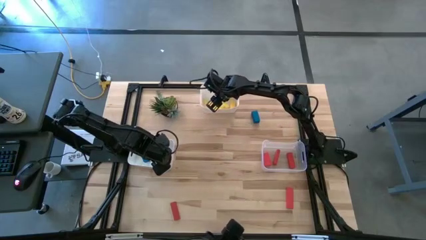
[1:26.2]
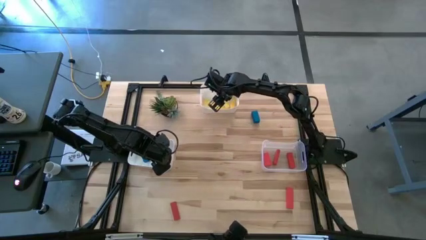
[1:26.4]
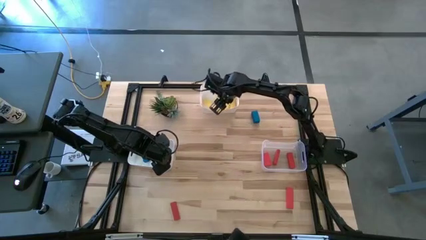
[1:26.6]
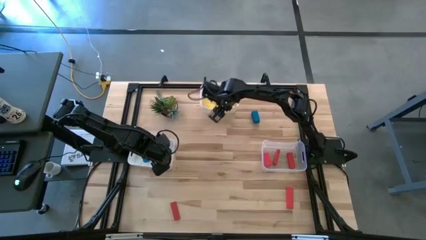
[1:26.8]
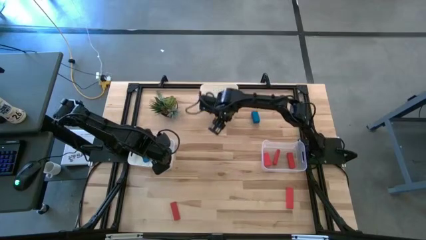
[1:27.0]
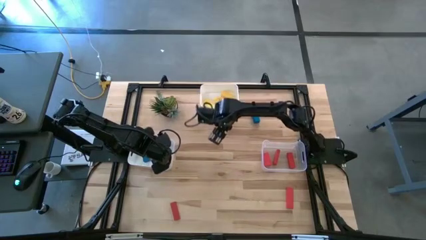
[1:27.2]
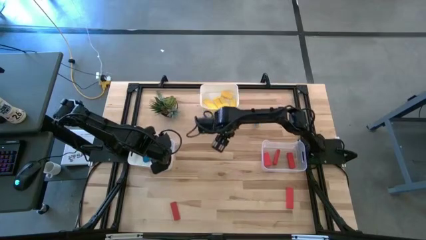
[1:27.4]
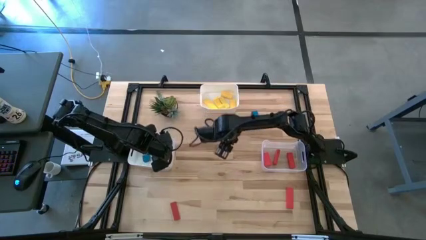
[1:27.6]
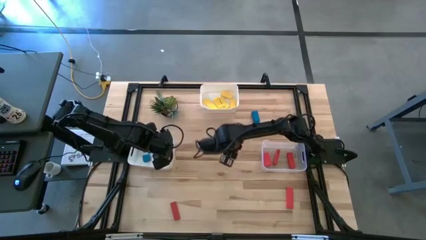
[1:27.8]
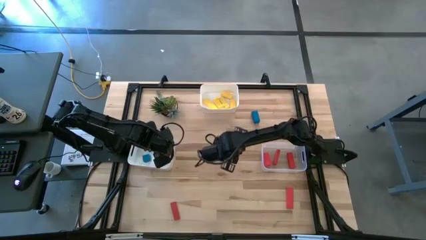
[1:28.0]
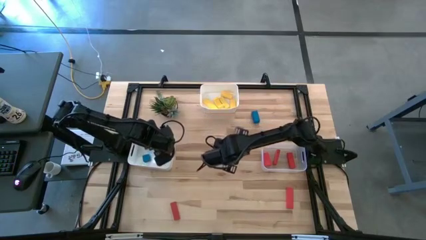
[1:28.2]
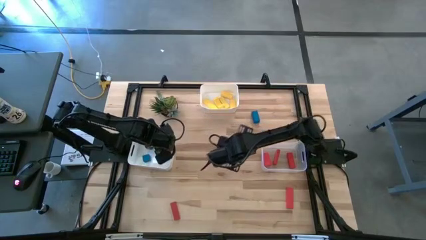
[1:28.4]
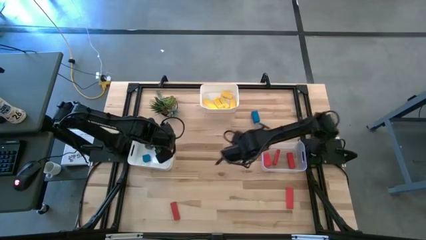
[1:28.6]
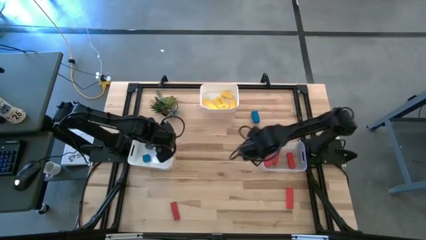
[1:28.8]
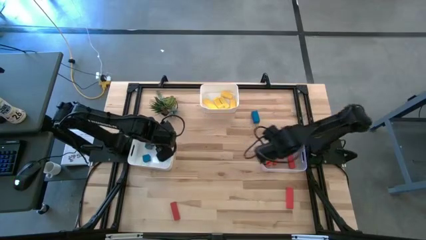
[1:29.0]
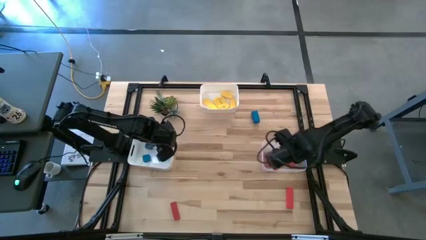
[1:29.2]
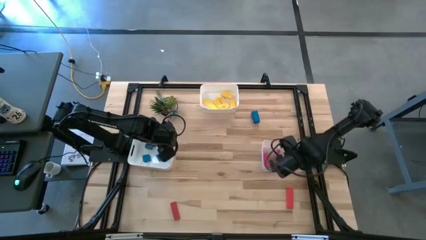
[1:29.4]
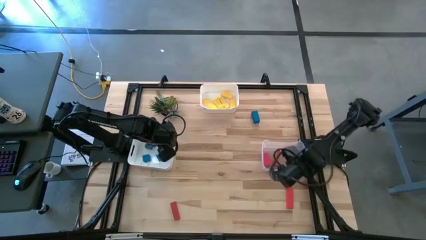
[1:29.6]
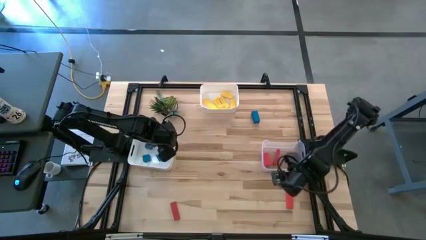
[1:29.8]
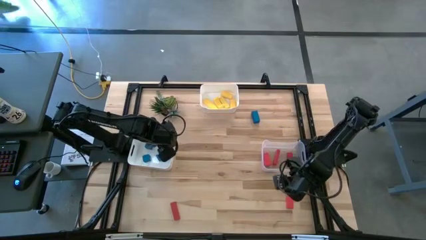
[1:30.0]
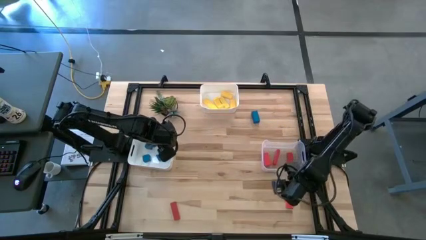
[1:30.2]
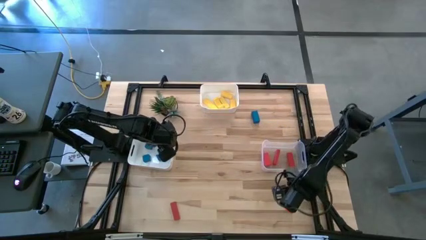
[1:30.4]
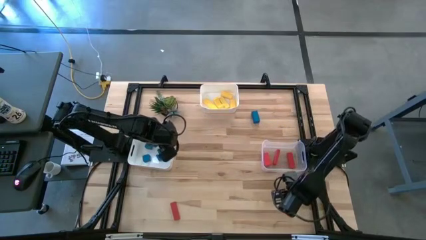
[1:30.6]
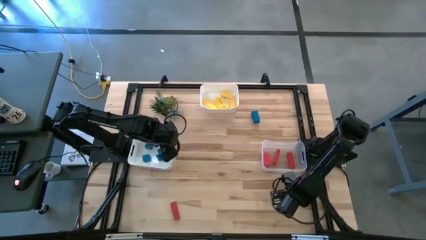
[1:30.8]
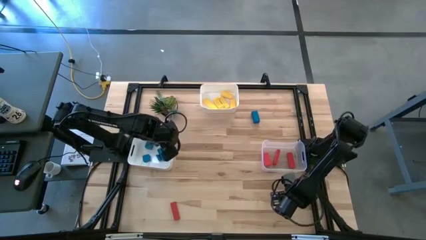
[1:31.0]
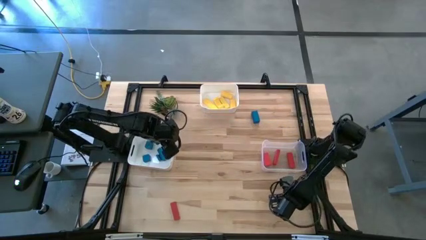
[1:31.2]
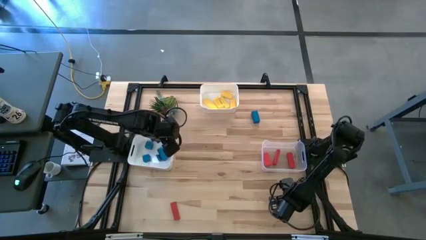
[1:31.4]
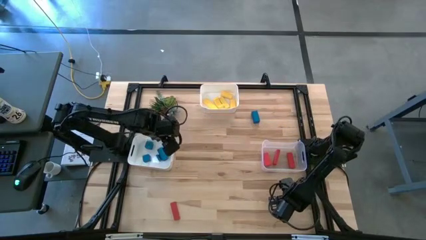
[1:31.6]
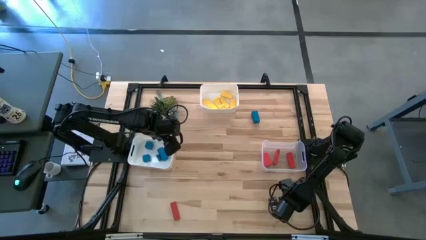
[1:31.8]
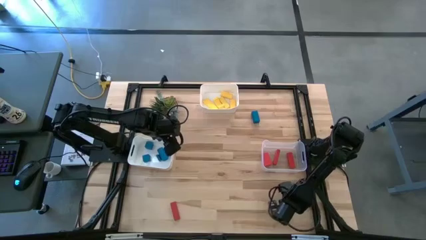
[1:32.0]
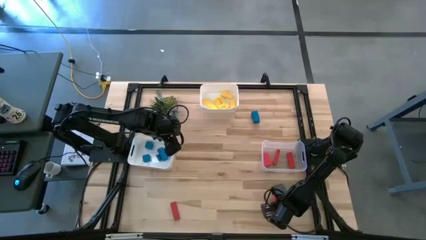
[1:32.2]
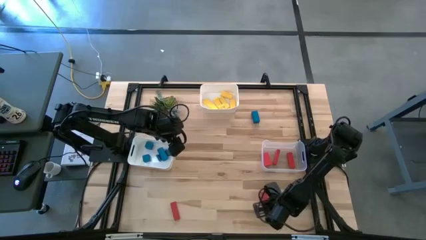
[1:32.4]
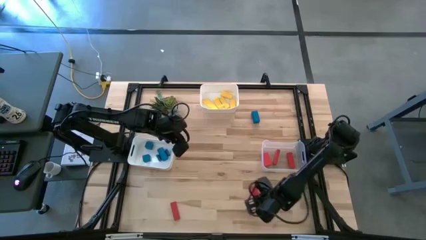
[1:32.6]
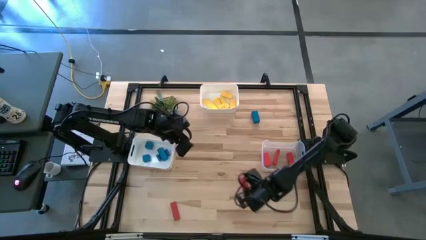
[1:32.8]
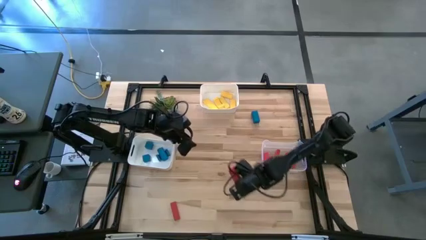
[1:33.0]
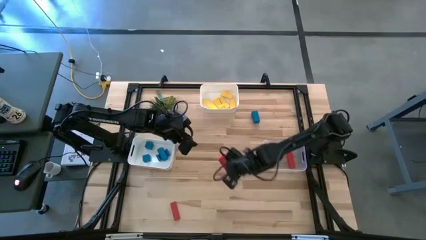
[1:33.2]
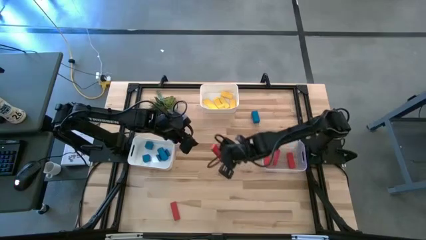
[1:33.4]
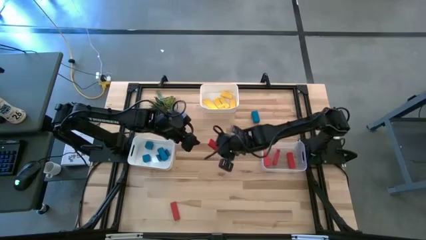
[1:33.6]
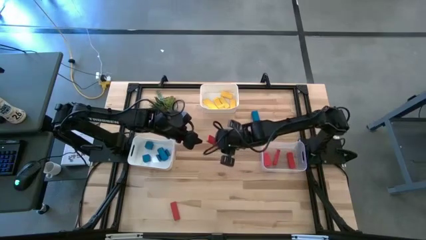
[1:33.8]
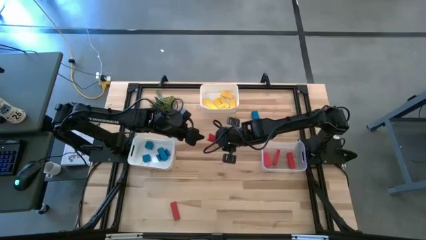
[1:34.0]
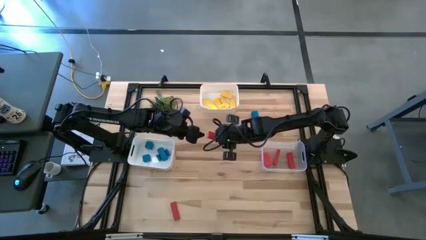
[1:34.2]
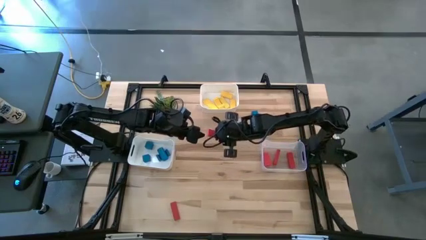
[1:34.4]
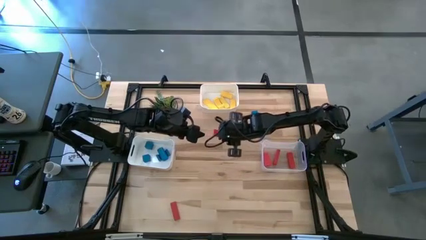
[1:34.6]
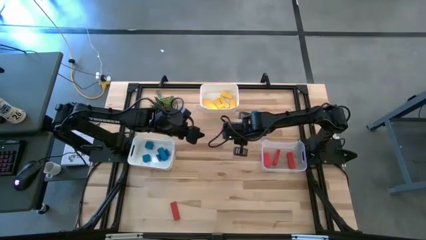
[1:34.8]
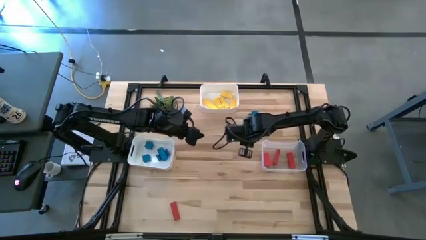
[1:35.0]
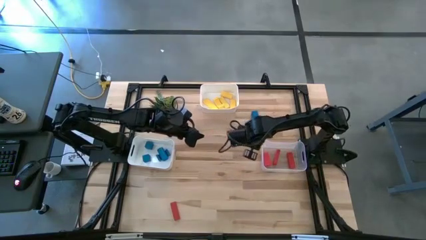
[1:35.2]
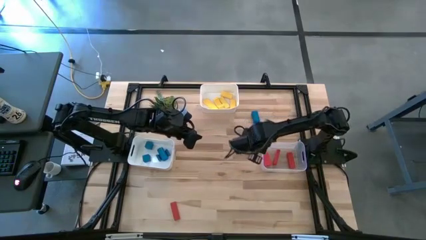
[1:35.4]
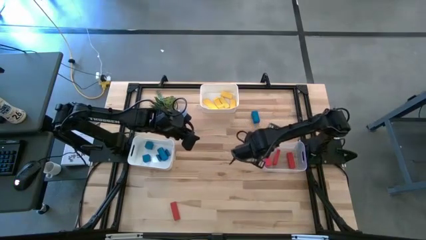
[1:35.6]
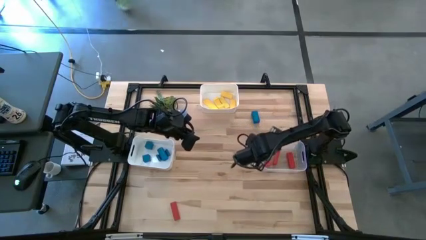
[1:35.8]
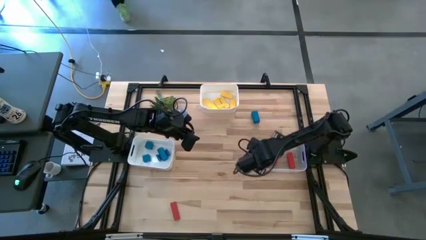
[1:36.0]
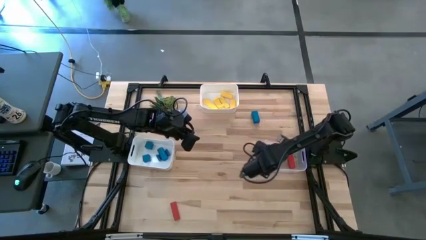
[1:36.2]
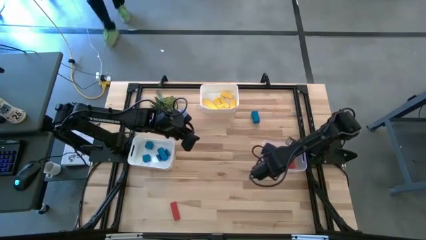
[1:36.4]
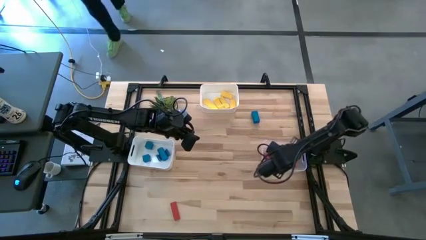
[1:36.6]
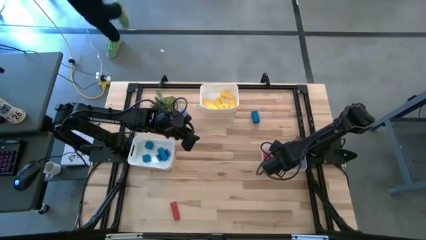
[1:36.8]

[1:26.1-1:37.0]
Task: Sort & place blocks by color
Put the bottom right red block into the bottom right transparent bin

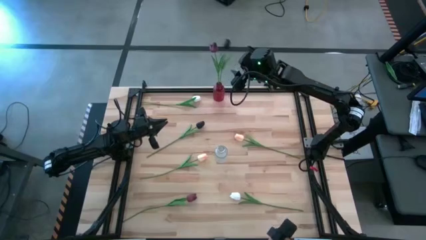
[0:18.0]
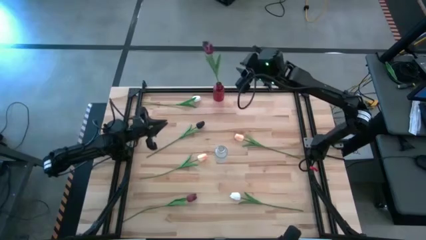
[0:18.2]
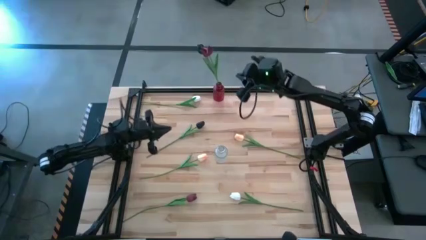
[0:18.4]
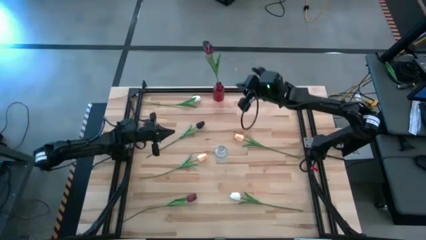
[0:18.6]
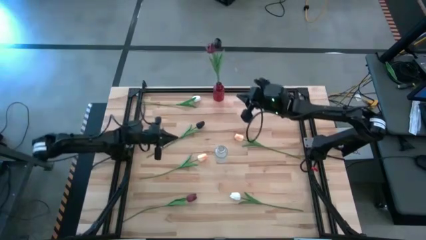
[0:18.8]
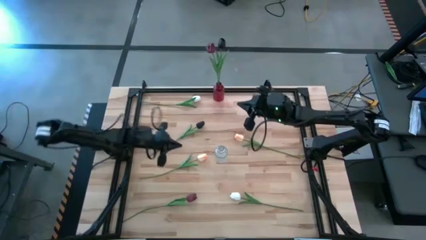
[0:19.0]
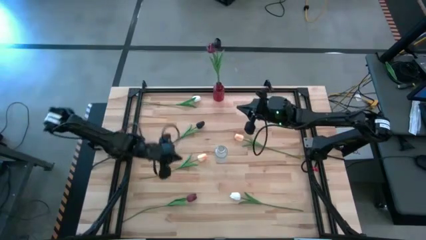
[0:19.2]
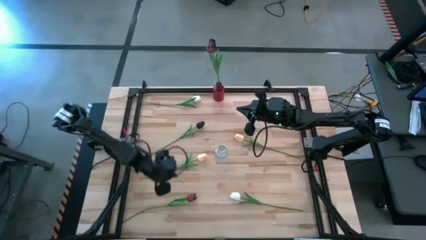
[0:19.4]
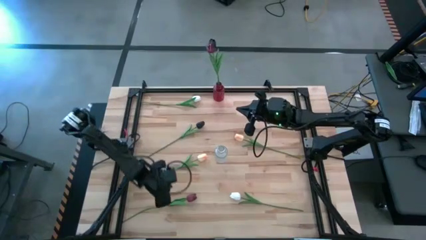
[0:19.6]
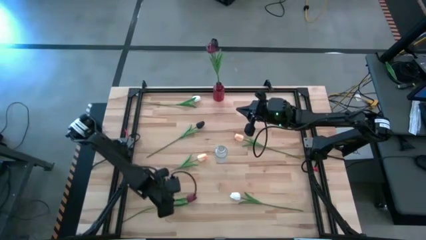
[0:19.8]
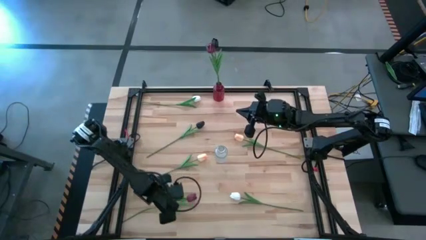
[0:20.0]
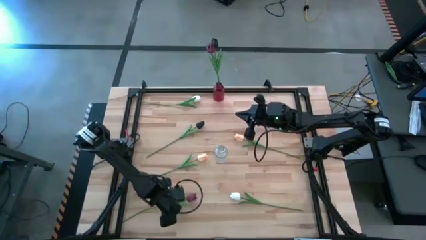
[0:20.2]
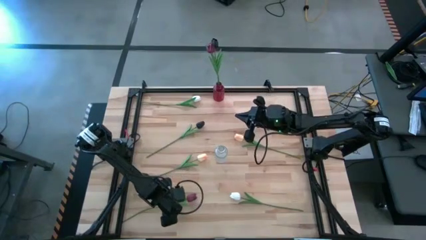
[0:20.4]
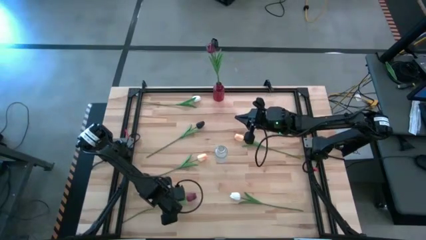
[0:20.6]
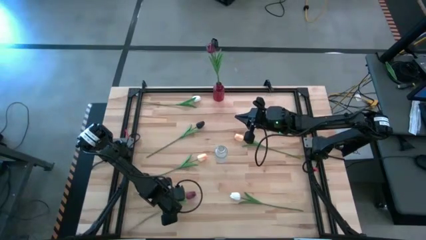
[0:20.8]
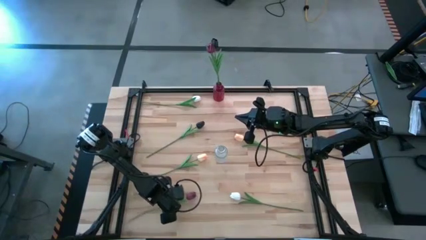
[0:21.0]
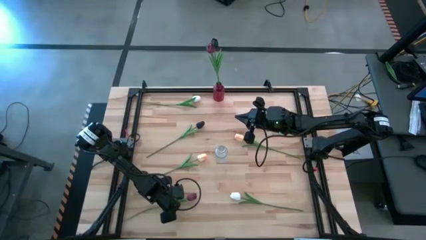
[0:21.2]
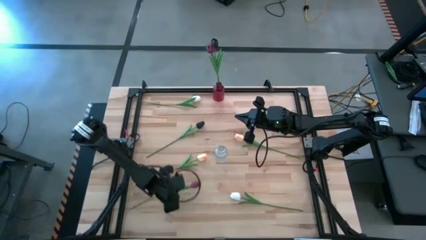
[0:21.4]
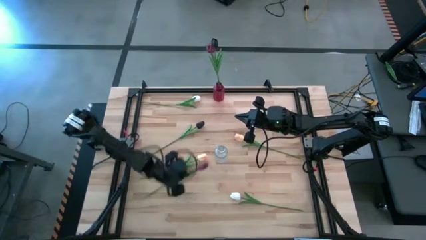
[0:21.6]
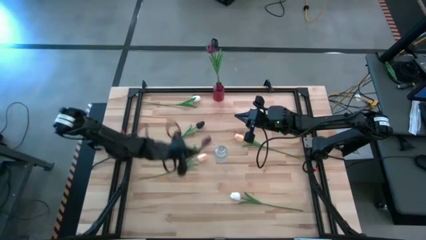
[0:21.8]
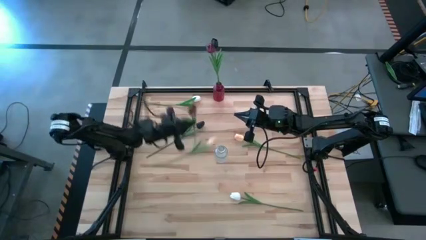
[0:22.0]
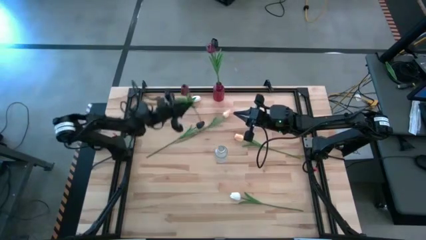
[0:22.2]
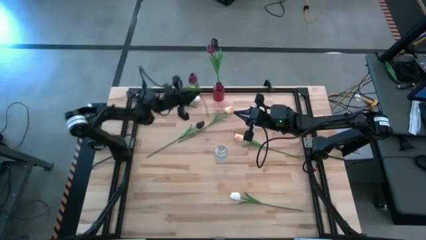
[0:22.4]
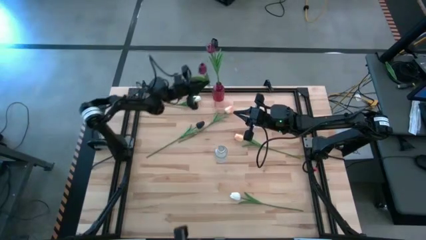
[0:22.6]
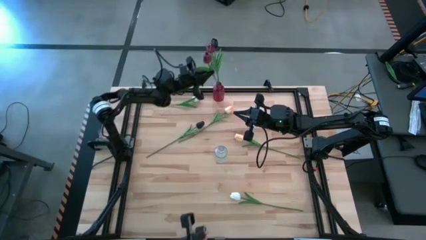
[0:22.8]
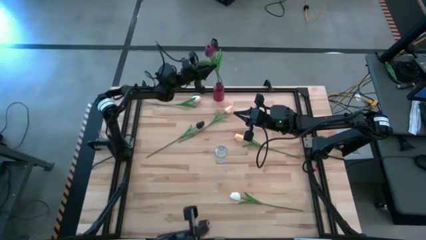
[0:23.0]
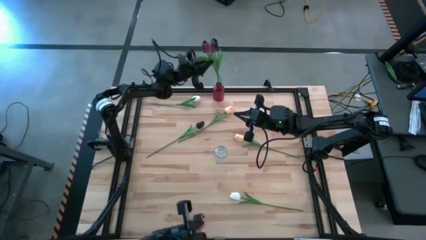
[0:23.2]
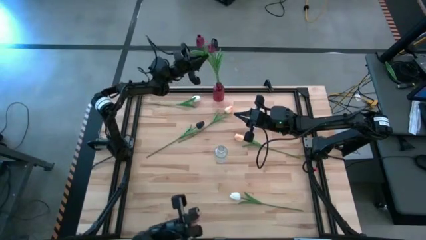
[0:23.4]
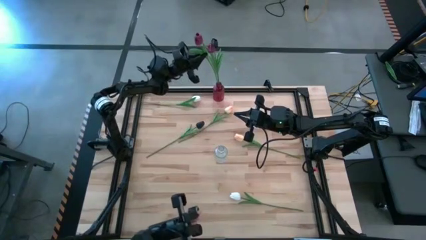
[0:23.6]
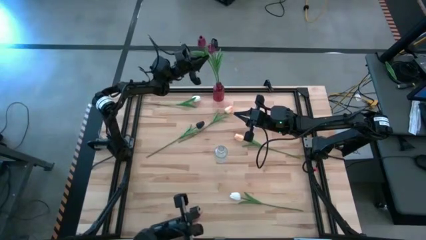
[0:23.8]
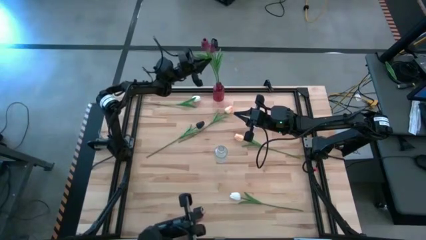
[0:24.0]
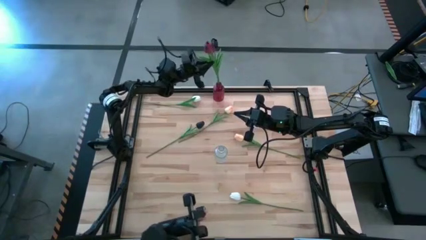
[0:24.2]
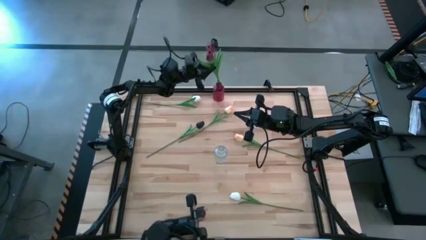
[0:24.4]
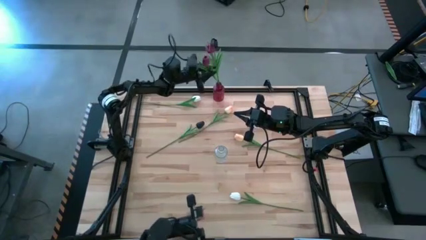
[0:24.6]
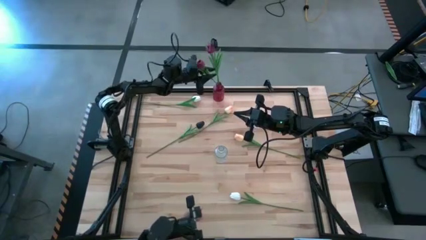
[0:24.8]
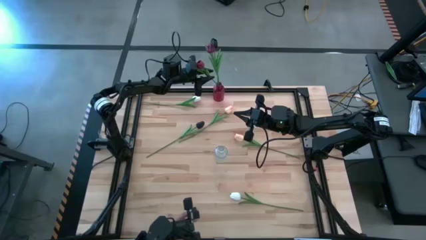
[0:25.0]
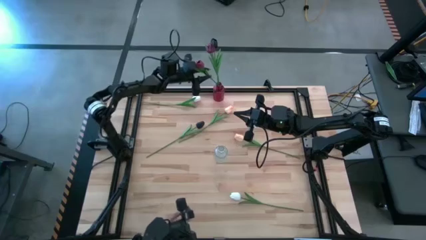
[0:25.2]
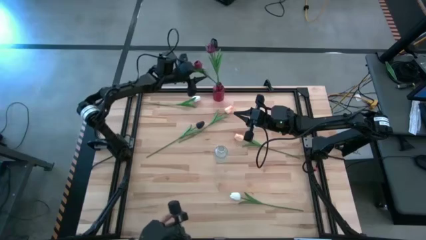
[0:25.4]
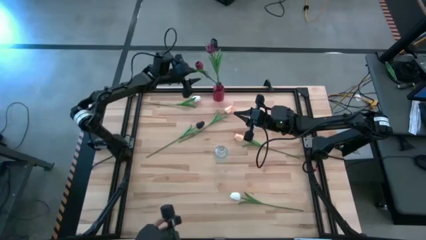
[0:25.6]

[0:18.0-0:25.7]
Task: Sort flowers into vase by color
Put the red tulip into the red vase
